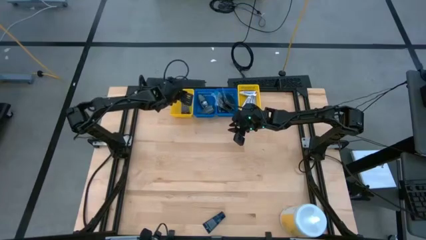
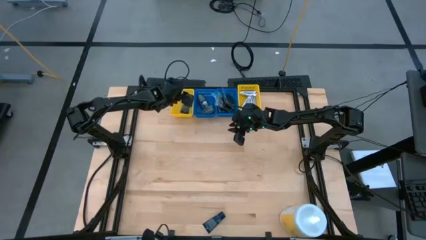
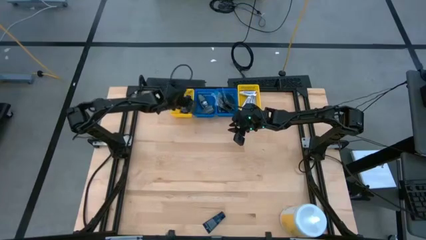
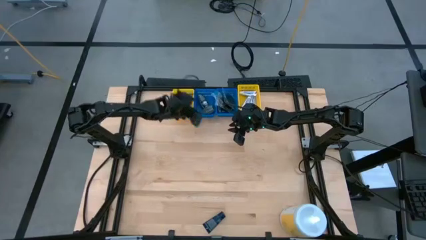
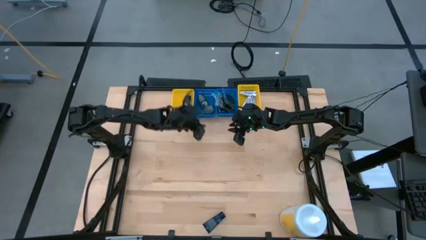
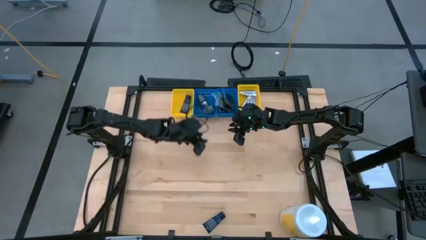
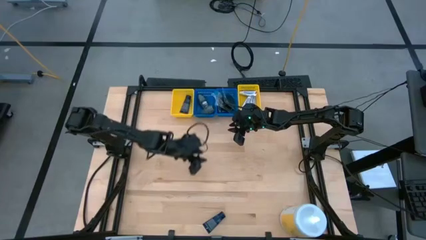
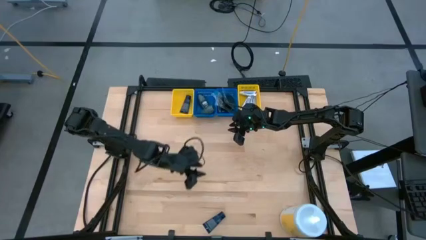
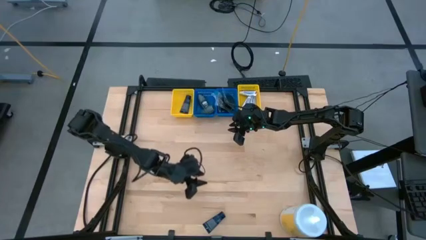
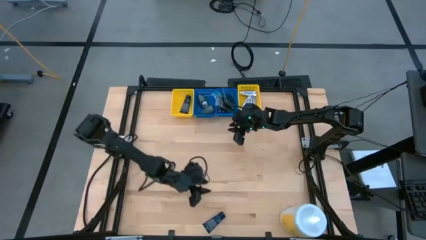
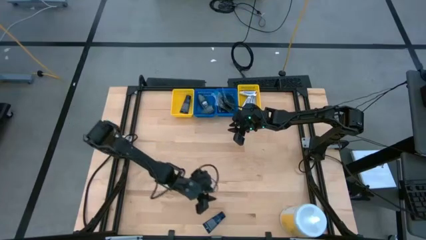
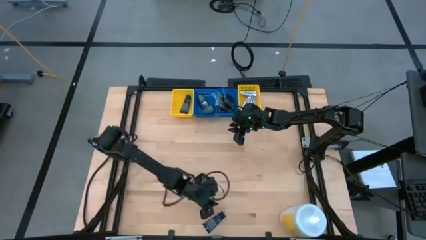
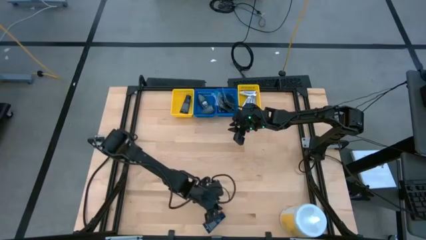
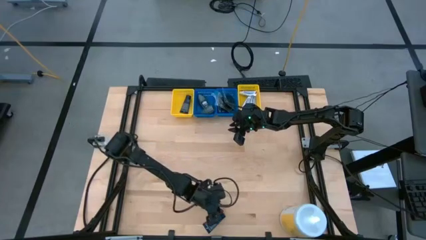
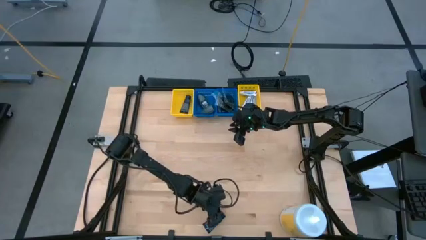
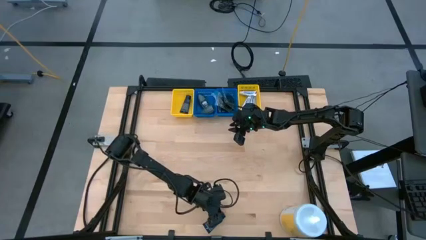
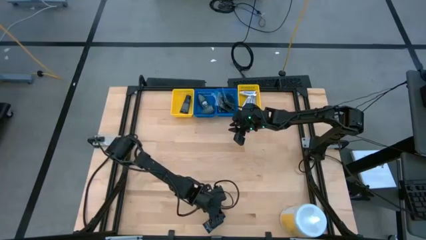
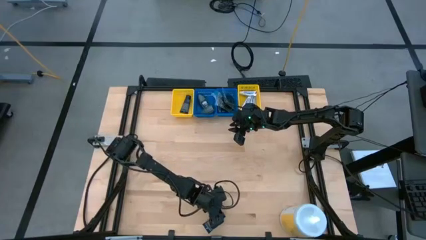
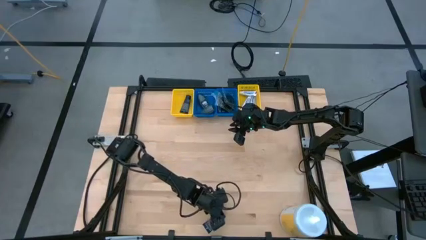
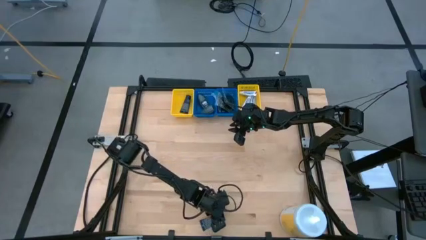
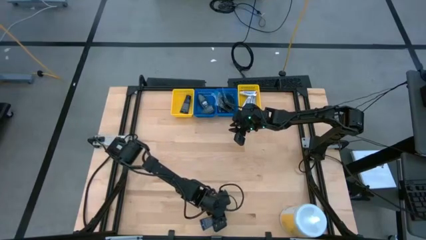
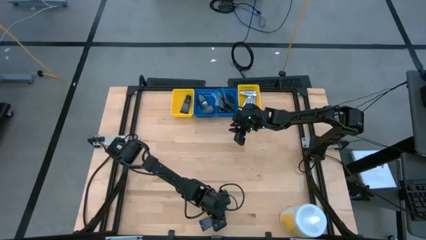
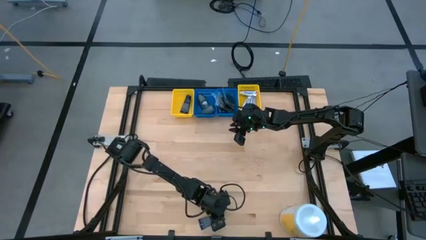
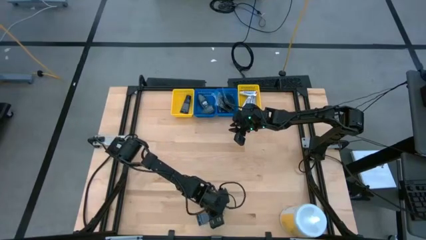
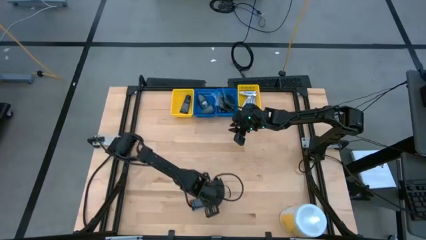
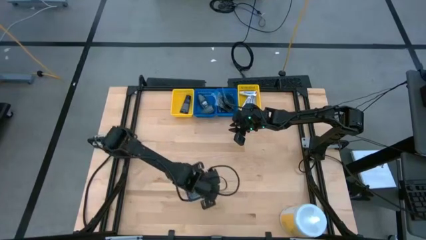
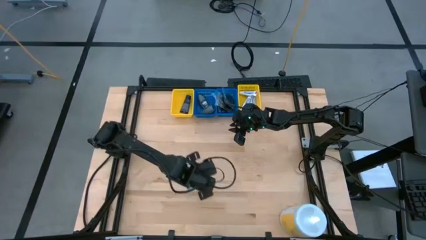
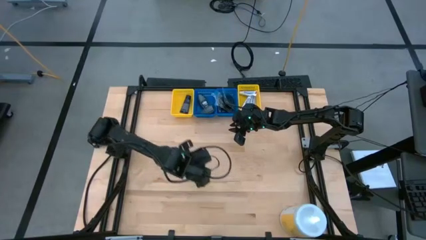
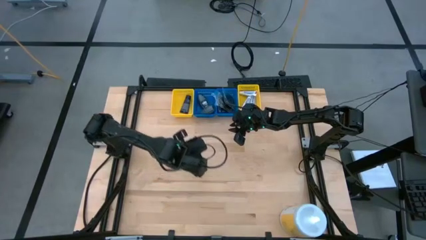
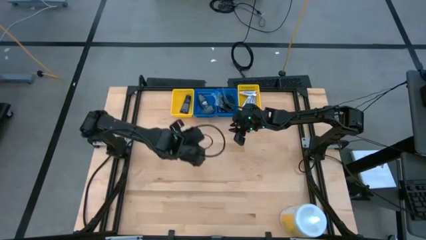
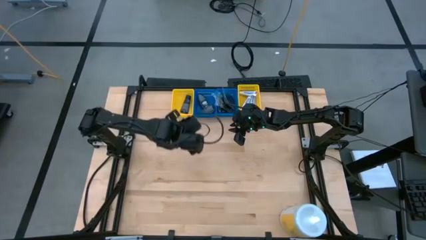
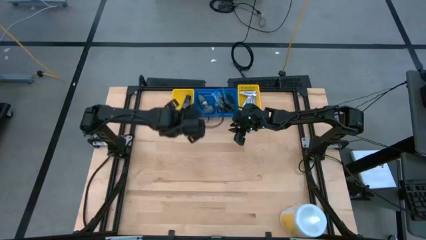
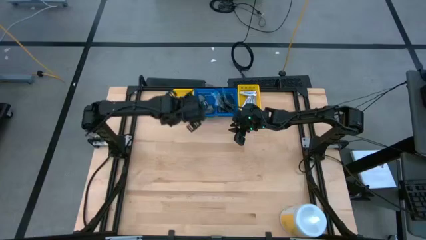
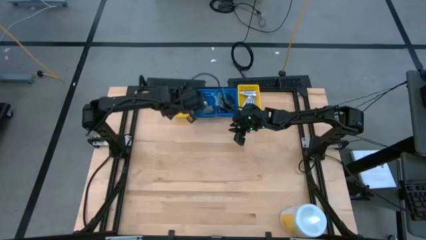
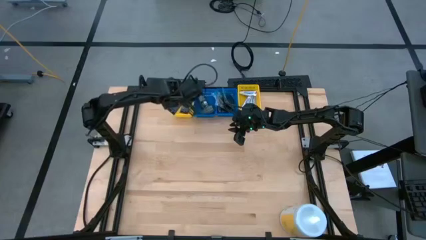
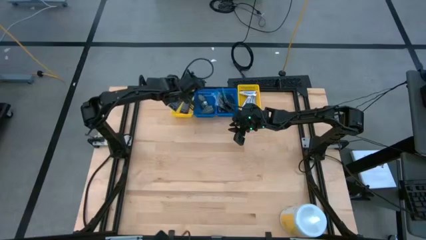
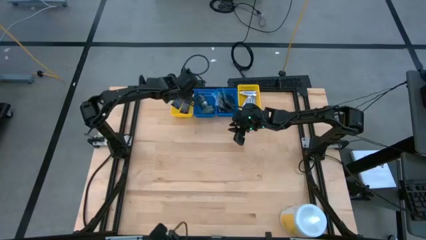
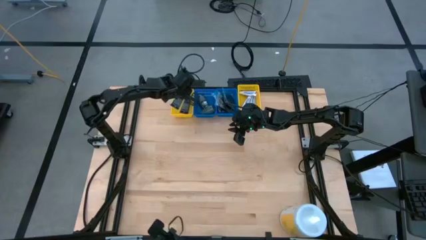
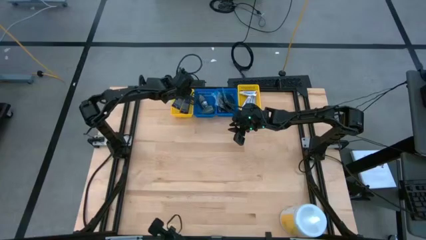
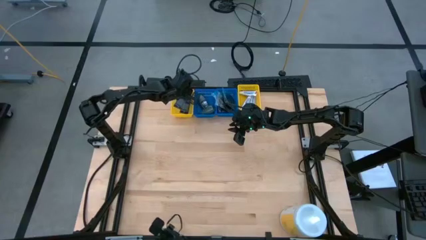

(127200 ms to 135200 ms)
Task: Pick & Place Travel size toiletries
Put the blue shaving cream into the left yellow bin

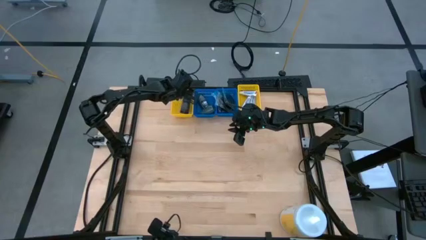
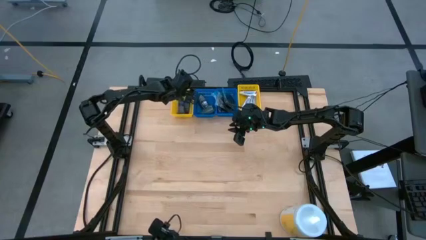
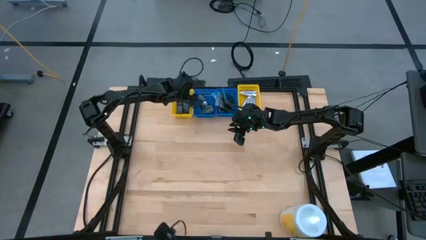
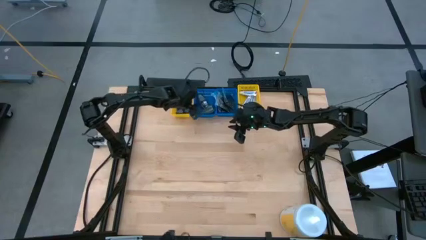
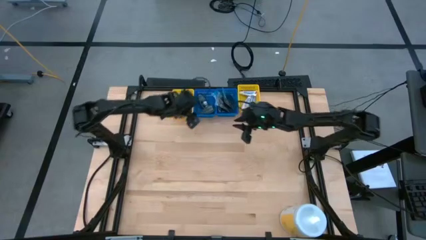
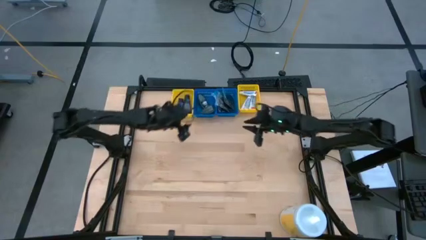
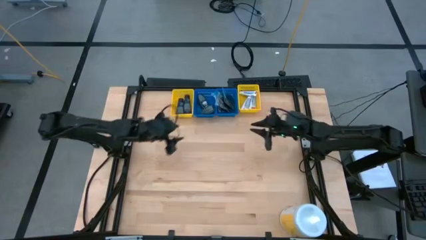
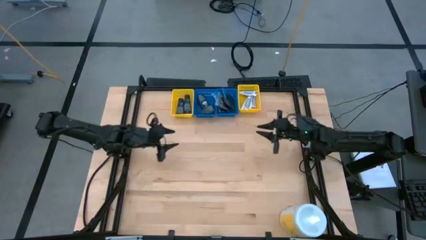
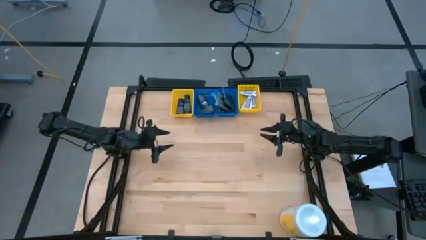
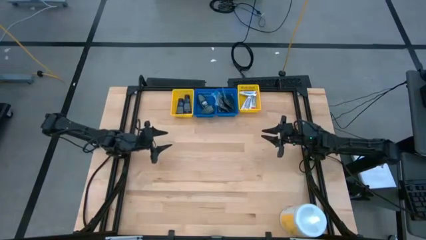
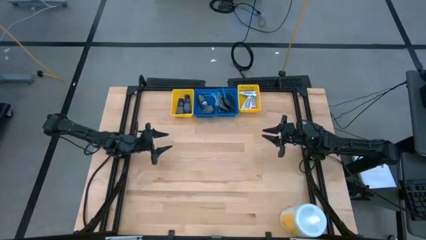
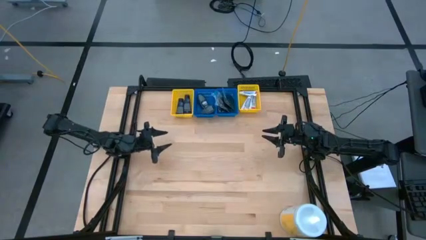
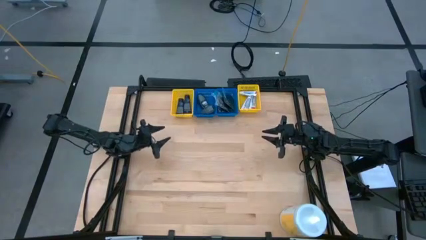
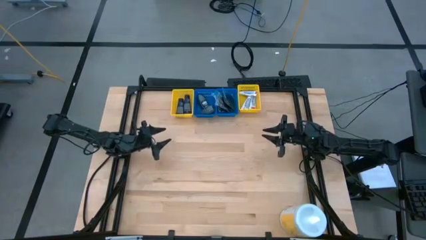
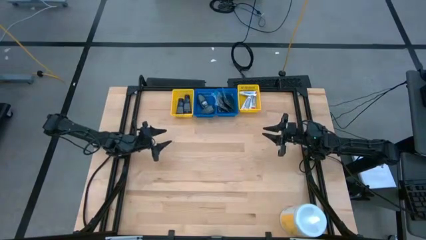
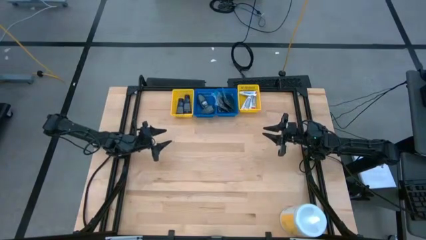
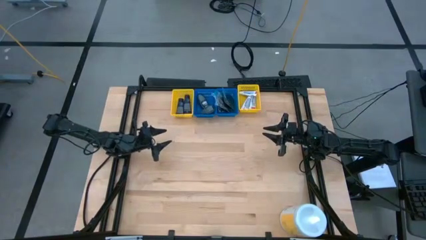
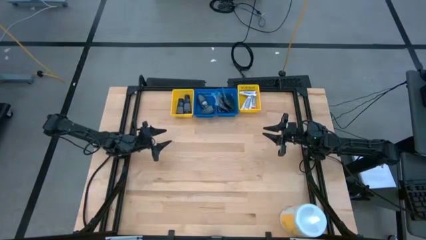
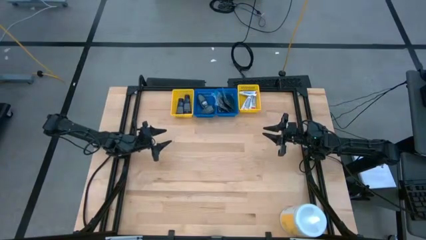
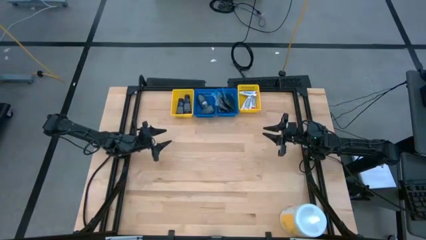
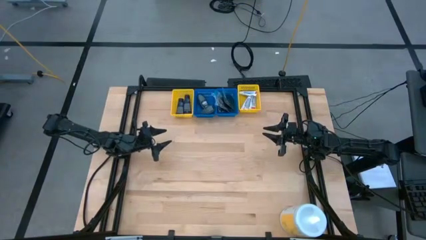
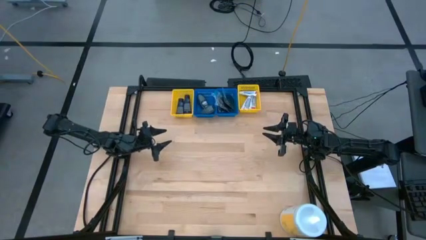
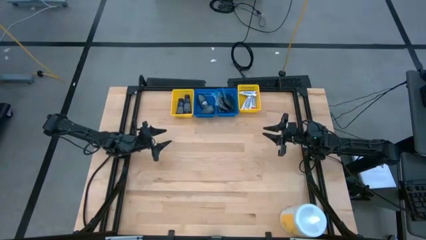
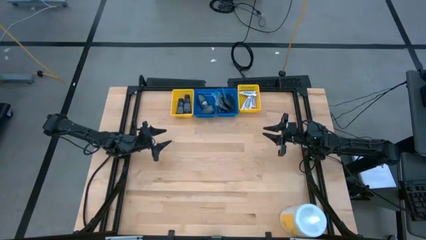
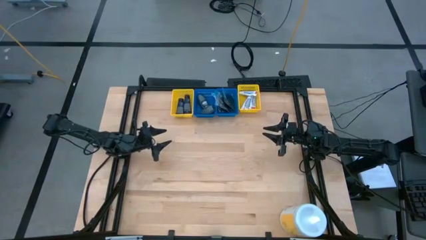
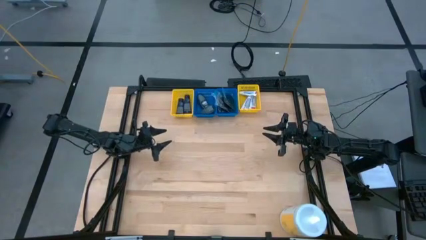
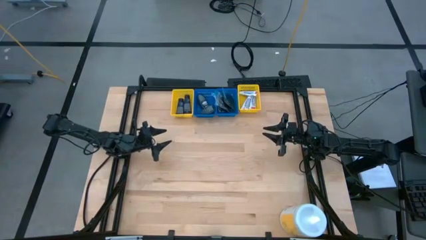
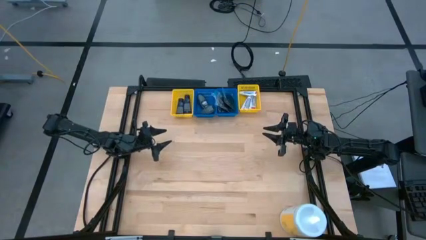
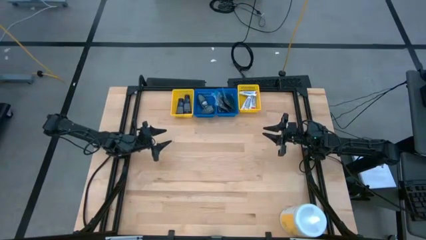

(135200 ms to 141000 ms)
Return to Home Position

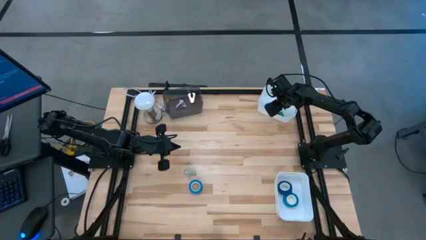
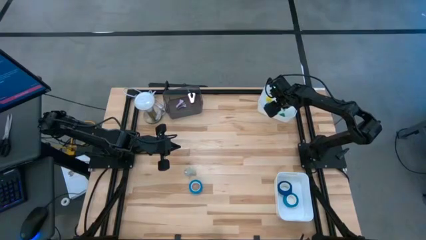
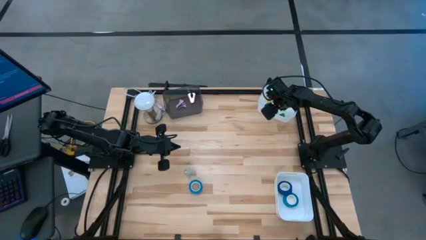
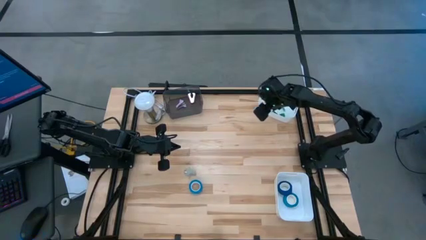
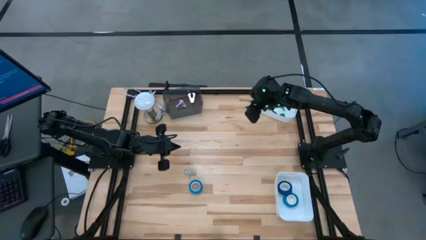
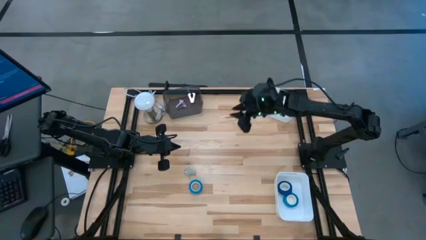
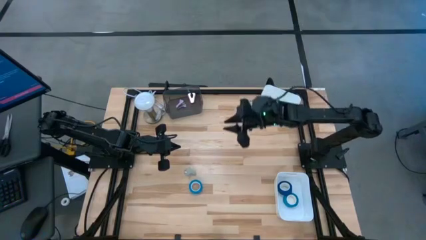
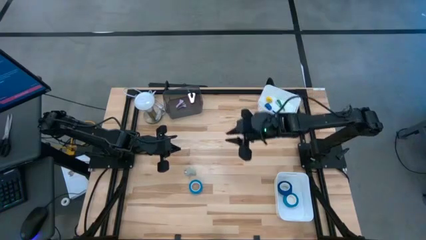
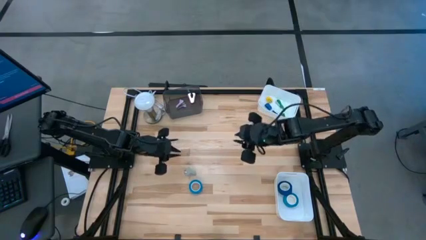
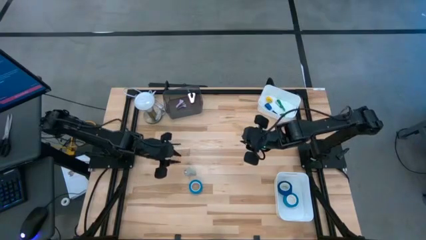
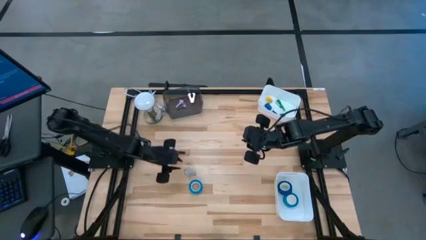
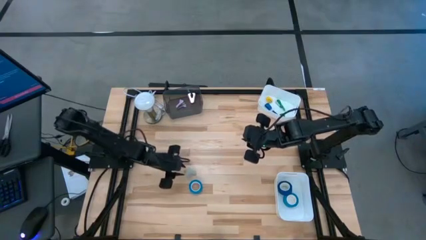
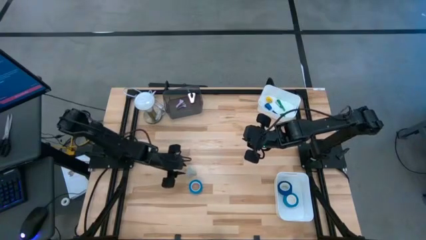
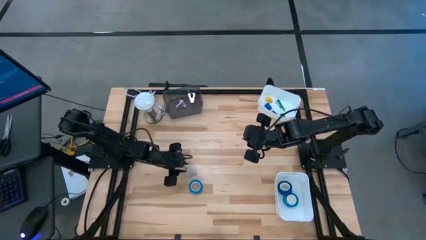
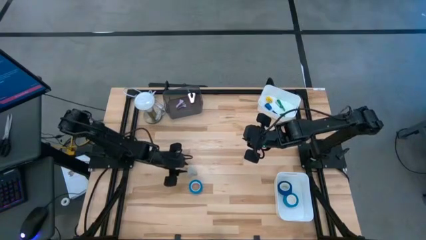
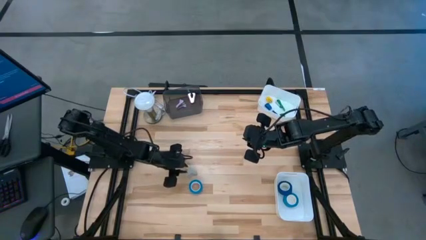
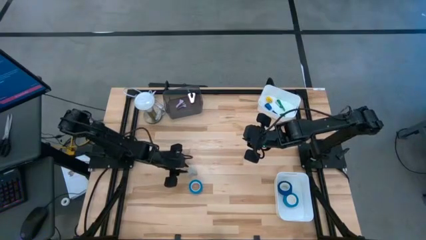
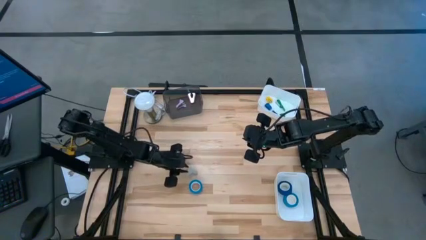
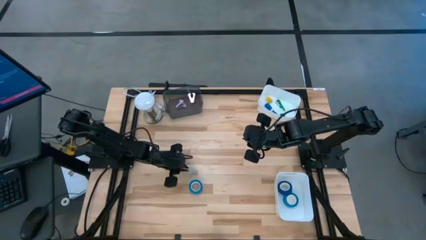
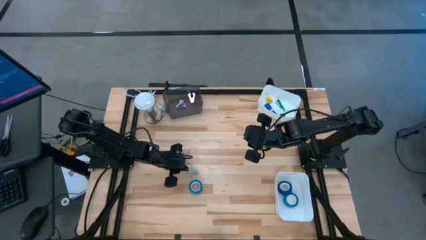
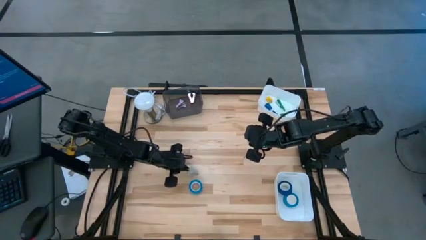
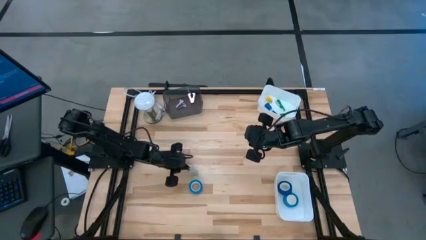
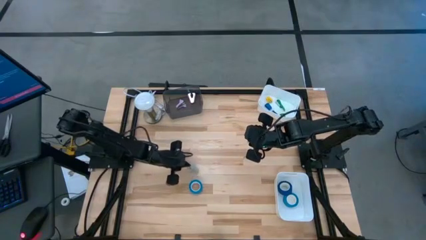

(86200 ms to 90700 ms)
Task: Pick and place Stapler, Stapler remover, tape
Put the gray staple remover into the black bin
